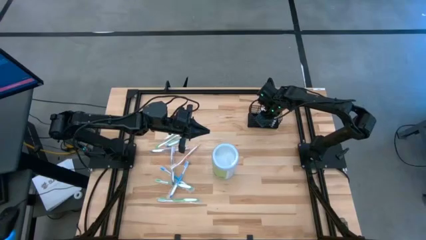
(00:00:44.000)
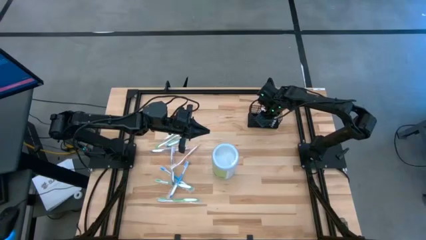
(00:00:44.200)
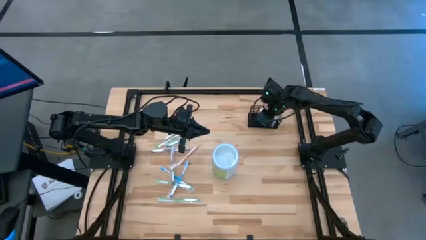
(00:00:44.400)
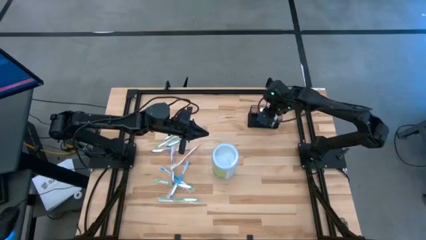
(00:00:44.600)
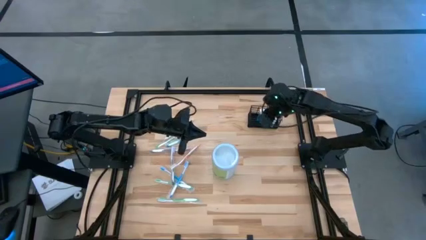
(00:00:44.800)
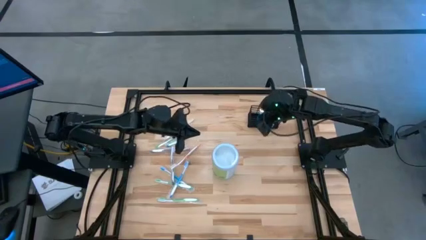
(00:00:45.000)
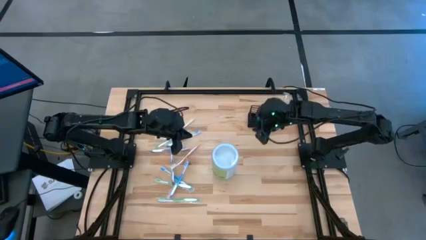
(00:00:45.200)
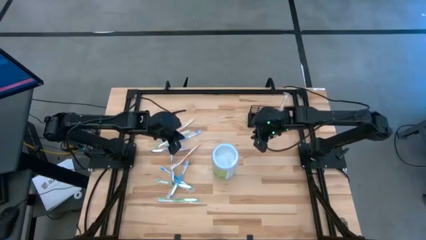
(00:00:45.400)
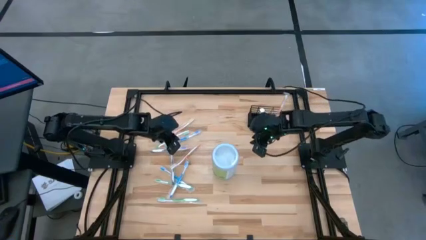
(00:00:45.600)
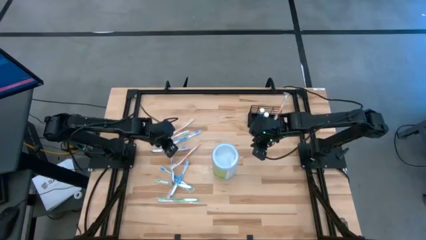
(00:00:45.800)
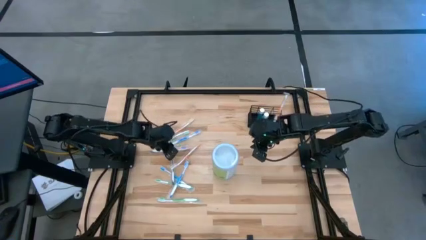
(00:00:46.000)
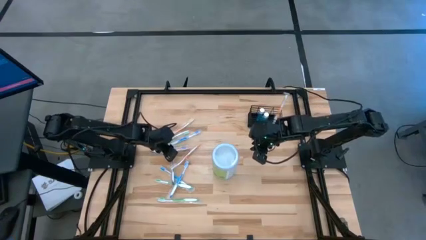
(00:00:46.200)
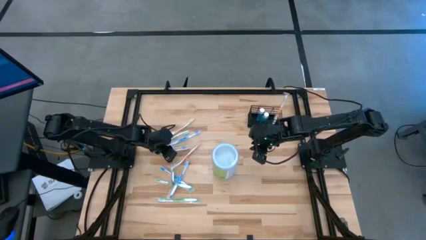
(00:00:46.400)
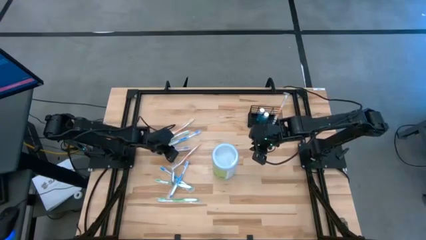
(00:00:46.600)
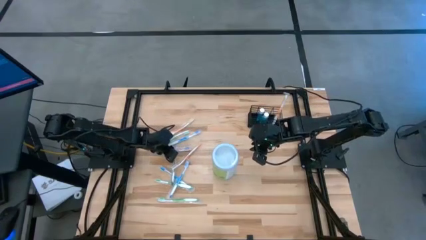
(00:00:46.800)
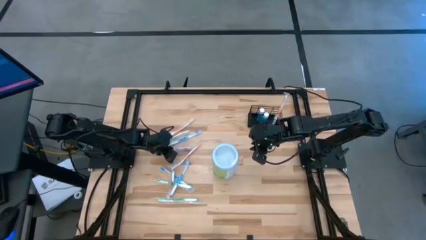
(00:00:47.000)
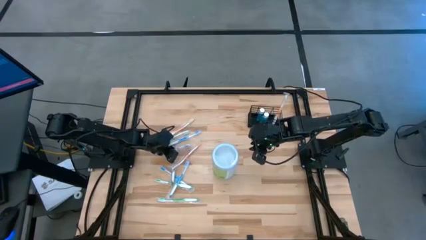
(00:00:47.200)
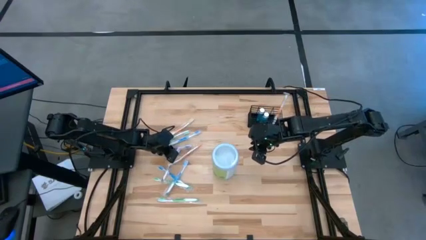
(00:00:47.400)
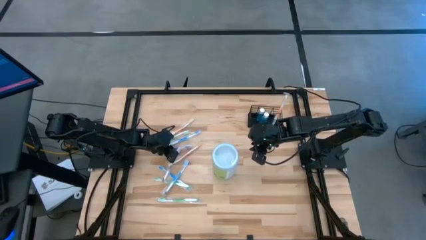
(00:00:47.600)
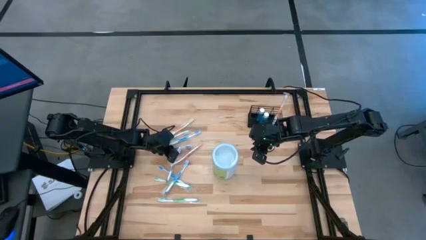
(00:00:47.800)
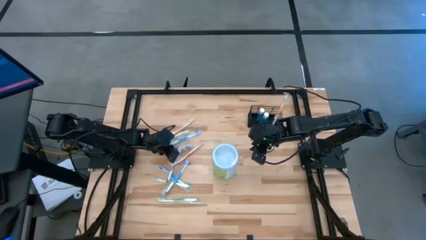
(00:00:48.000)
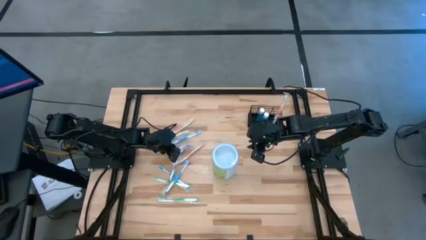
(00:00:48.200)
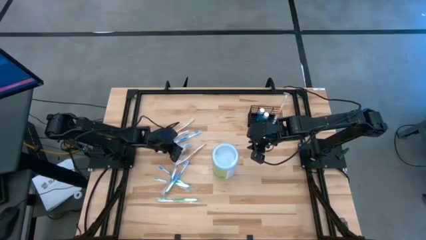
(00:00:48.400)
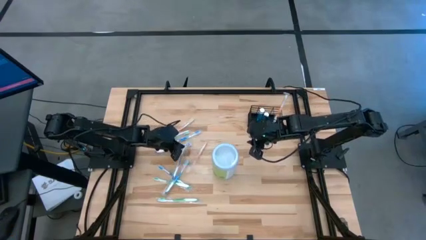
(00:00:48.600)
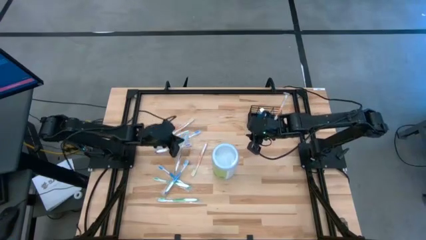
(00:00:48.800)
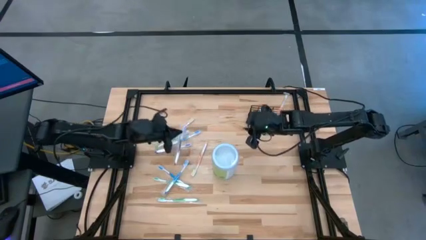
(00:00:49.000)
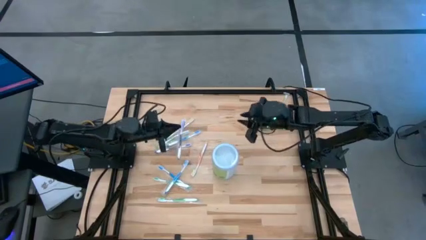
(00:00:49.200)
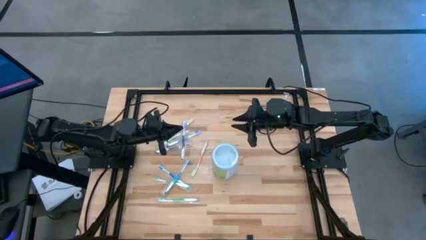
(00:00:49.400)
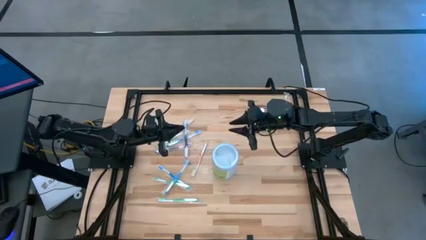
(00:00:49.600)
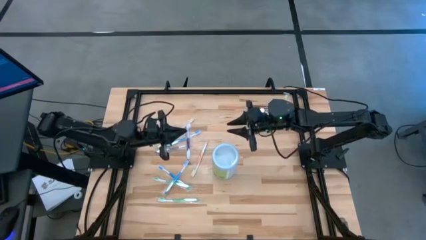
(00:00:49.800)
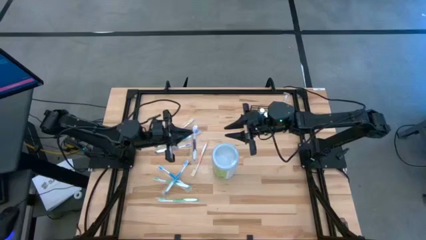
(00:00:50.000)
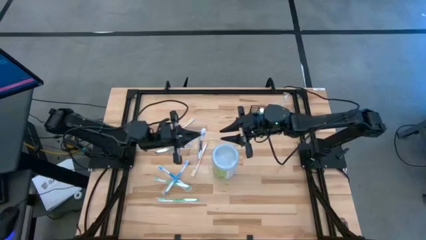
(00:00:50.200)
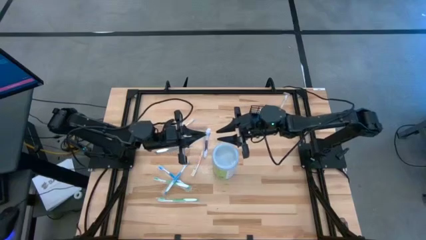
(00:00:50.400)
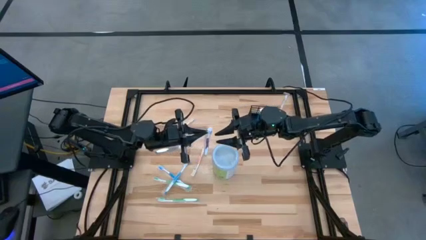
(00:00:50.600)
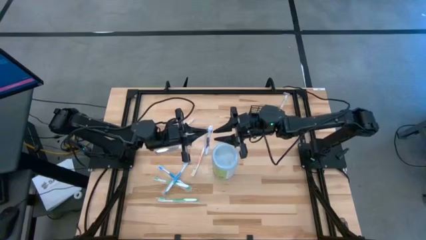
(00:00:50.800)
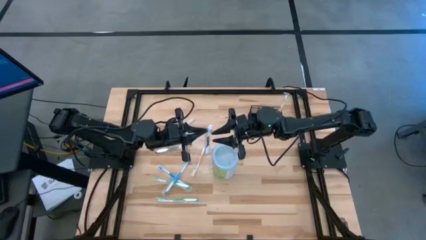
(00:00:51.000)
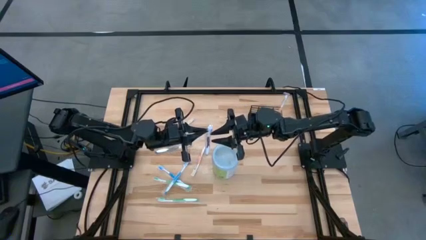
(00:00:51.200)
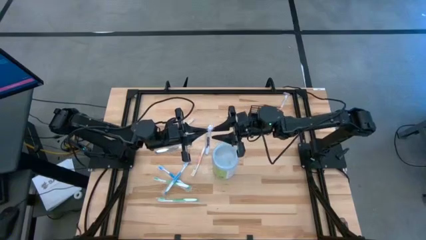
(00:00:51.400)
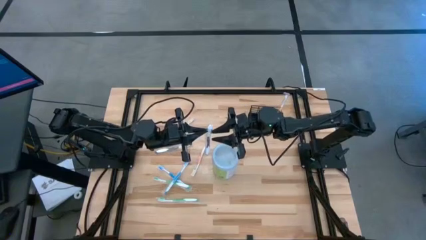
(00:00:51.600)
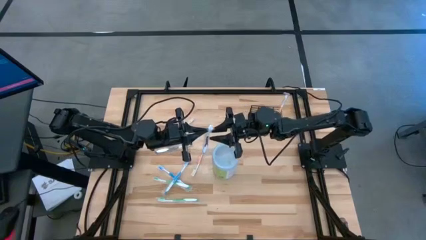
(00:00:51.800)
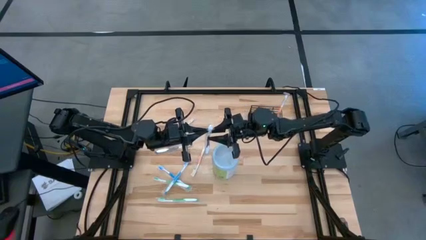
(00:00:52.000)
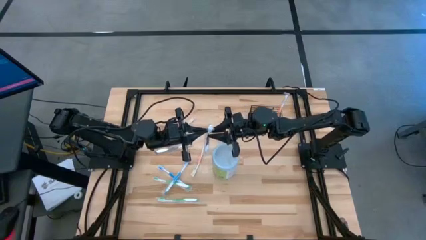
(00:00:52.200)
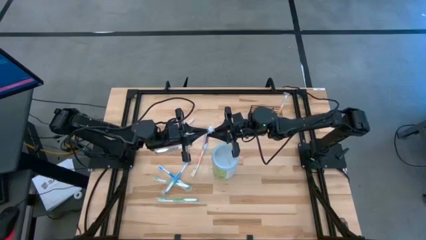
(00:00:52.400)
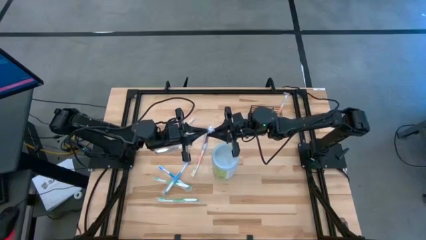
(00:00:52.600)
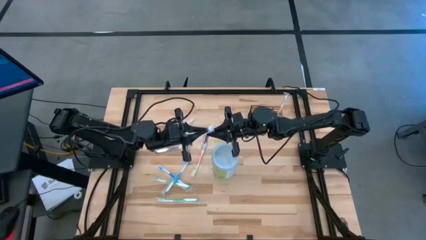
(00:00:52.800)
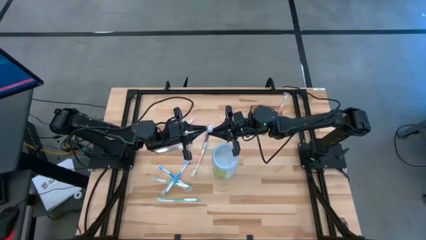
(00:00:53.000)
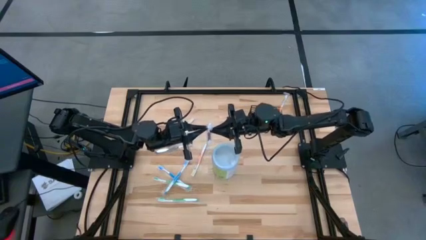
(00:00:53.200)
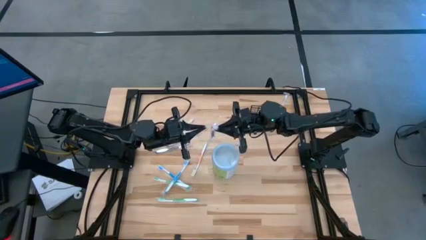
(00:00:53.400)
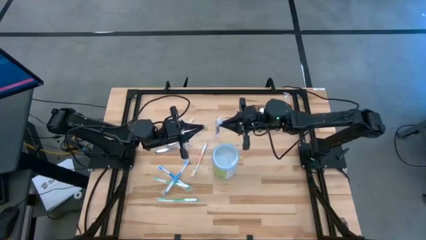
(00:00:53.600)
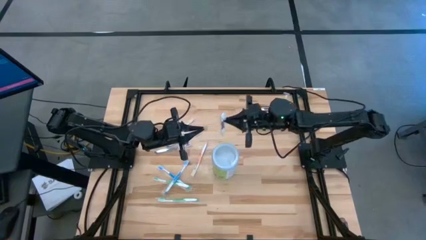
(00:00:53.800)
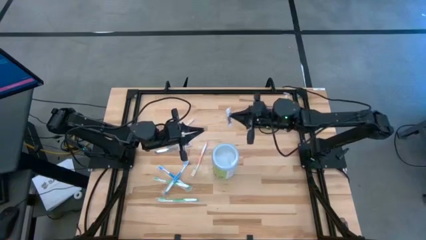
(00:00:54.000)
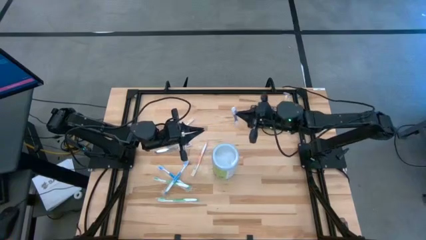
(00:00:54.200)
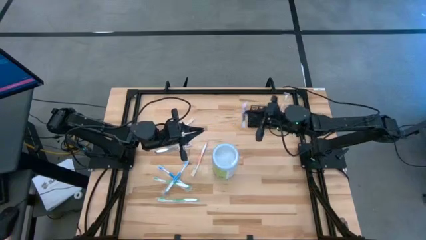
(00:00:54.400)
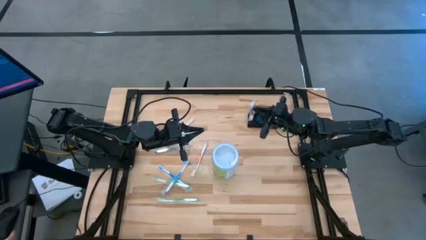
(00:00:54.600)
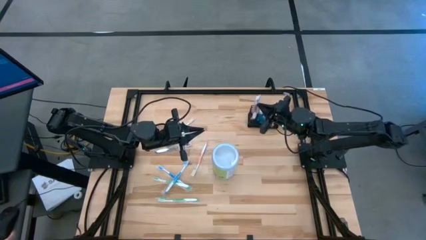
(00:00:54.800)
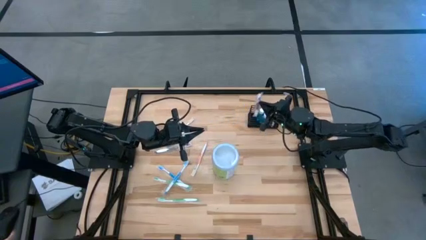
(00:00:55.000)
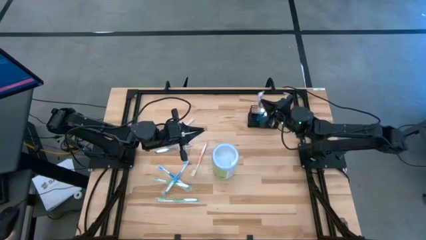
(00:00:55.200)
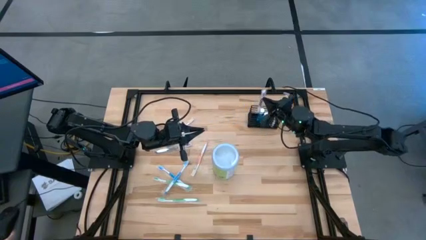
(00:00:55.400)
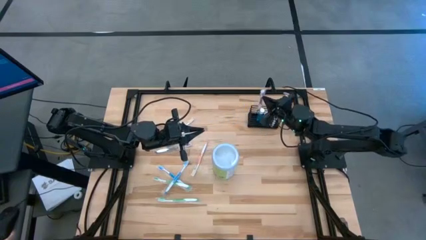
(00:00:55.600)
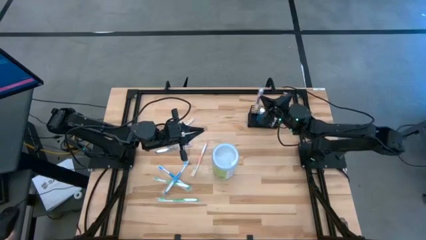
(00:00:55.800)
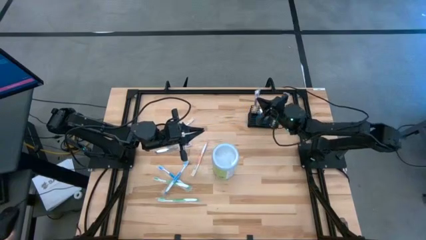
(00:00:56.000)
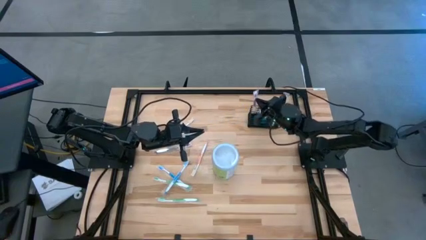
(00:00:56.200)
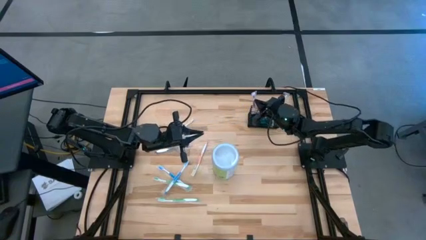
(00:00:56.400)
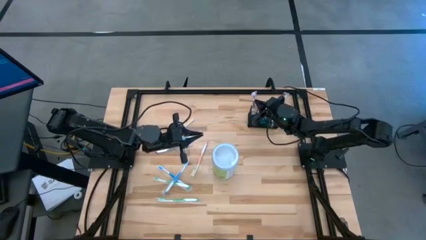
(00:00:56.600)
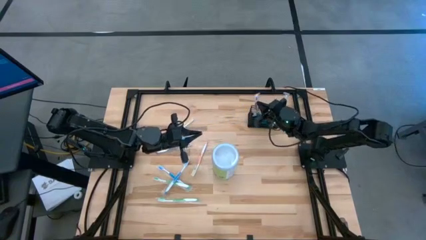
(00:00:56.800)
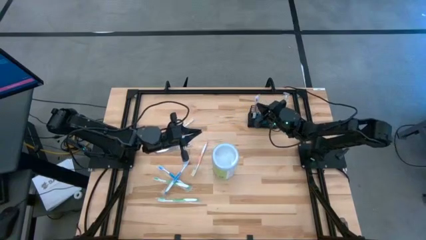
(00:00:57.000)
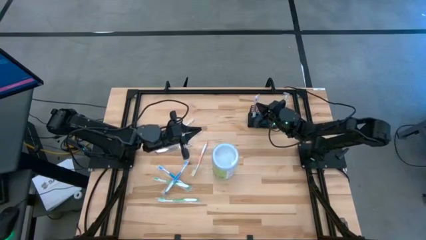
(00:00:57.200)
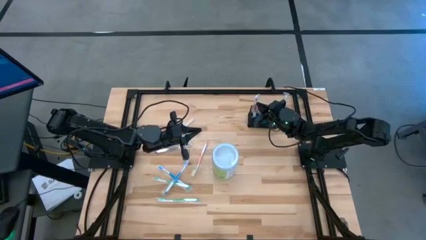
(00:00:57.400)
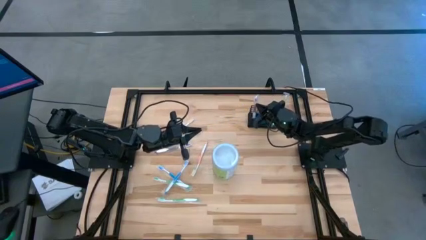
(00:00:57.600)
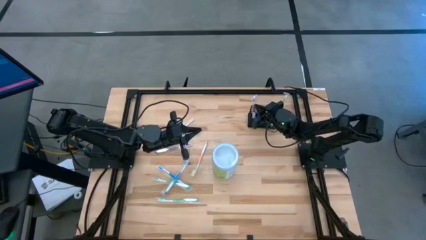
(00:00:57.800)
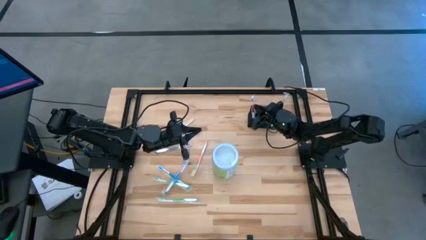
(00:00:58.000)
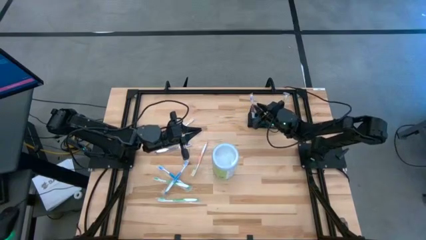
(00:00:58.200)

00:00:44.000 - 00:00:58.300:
Task: Pick & Place toothbrushing station
Put the purple toothbrush into the wire organizer
